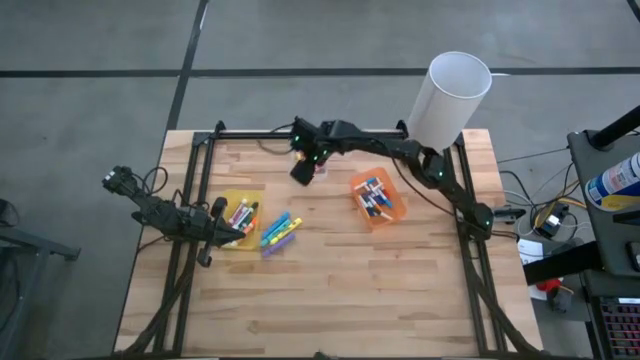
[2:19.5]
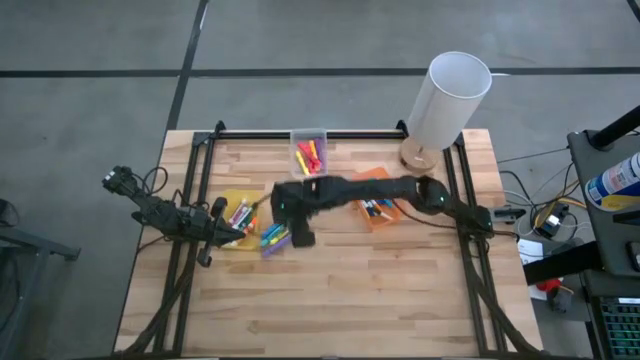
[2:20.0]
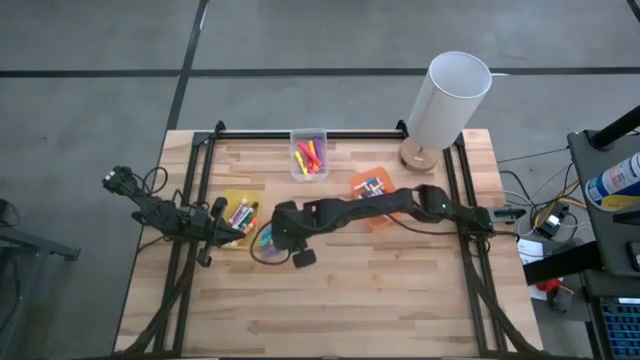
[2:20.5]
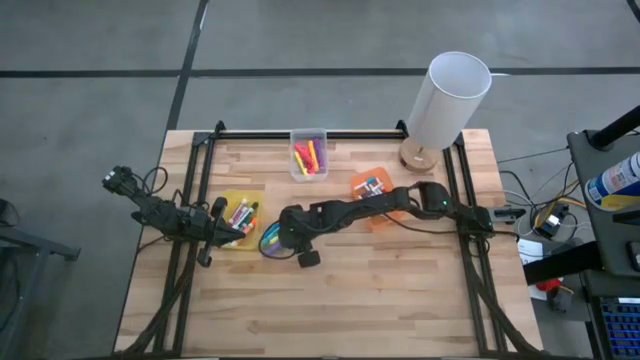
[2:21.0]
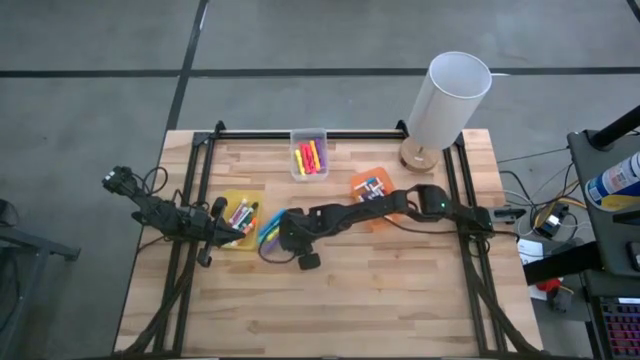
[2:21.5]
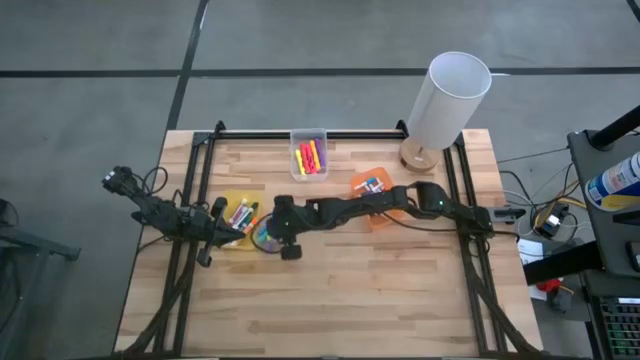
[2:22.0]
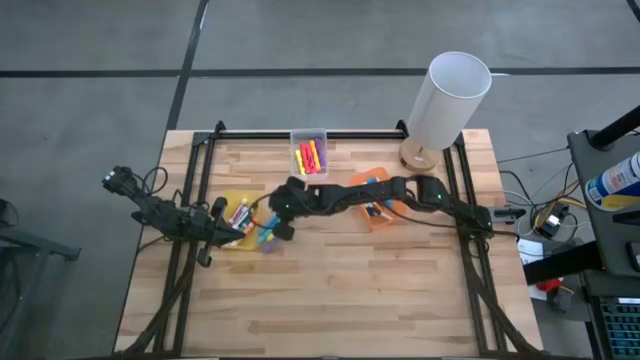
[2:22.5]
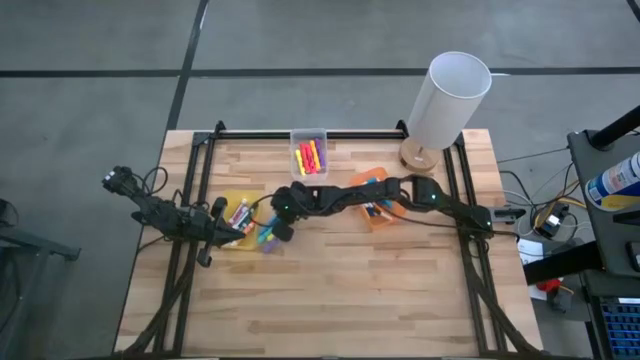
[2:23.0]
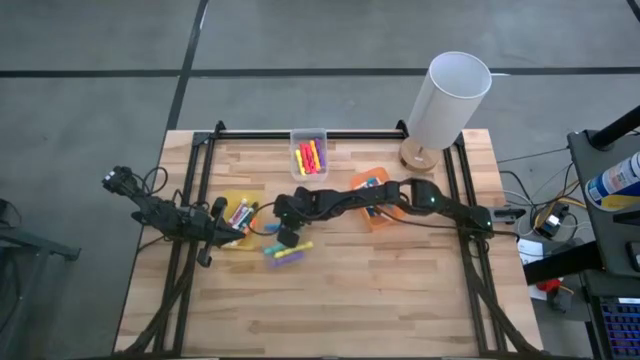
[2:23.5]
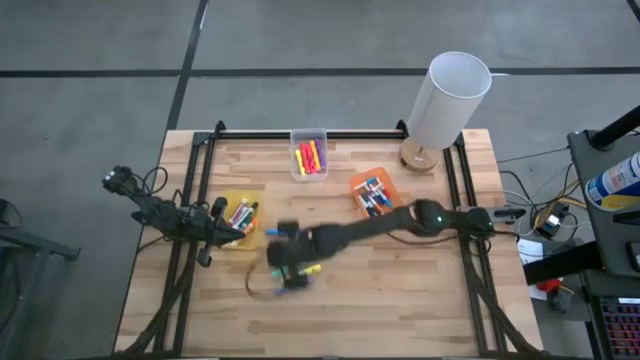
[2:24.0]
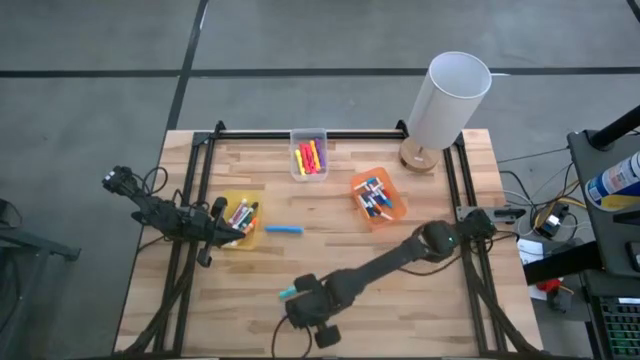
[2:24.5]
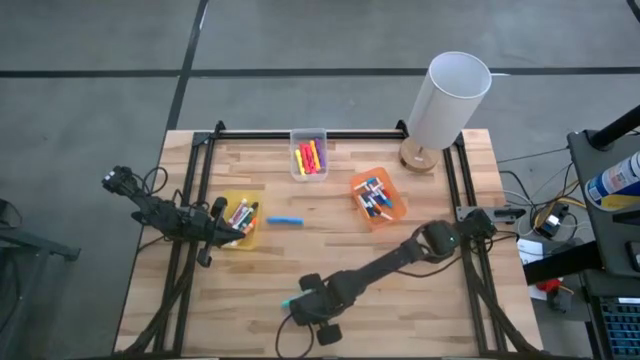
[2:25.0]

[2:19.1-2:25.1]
Task: Pick & Place Markers
Adjust the highlighters

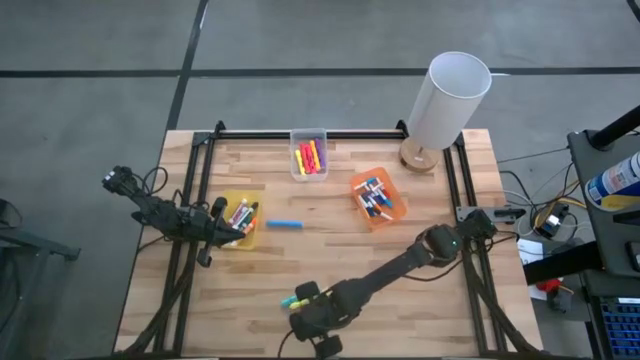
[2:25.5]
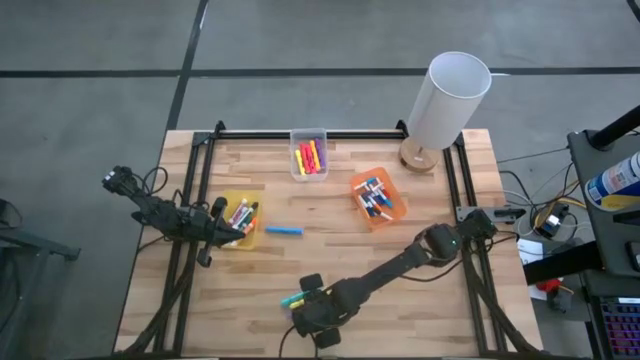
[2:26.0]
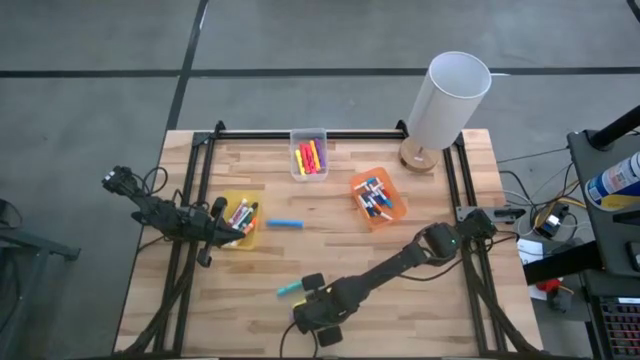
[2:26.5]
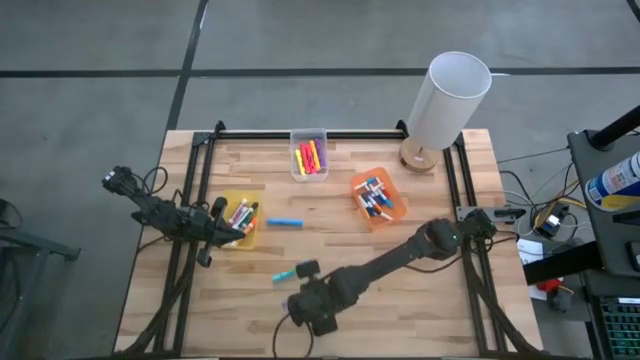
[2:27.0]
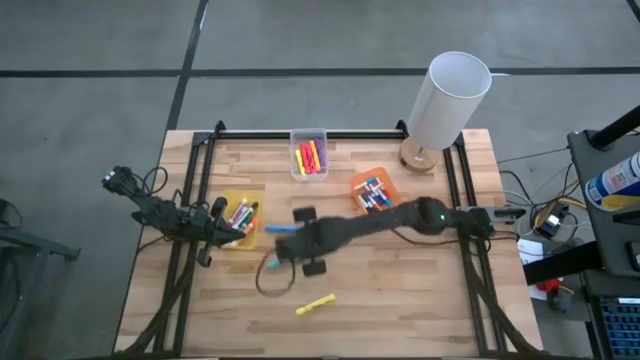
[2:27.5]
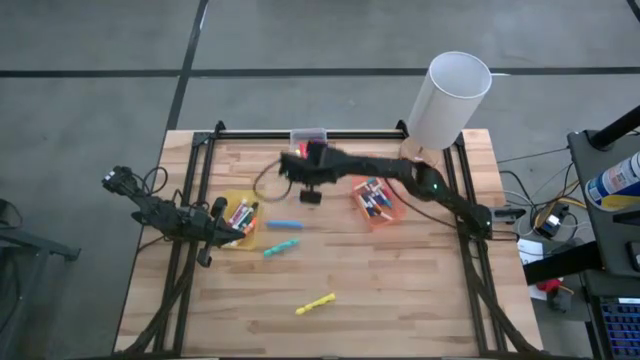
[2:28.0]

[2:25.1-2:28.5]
Put the light purple highlighter into the transparent bin

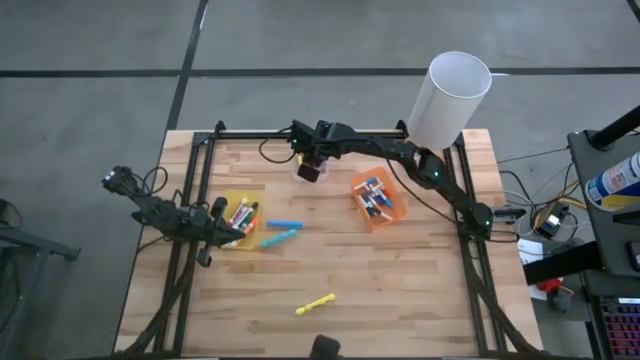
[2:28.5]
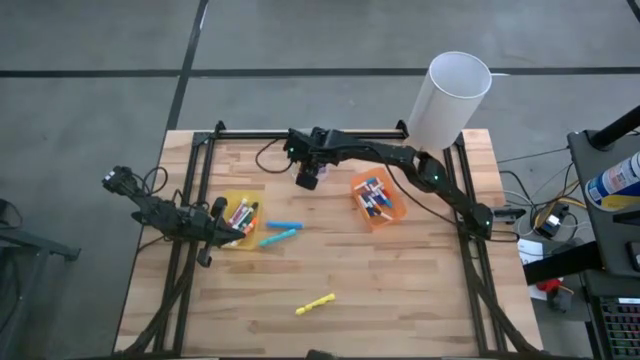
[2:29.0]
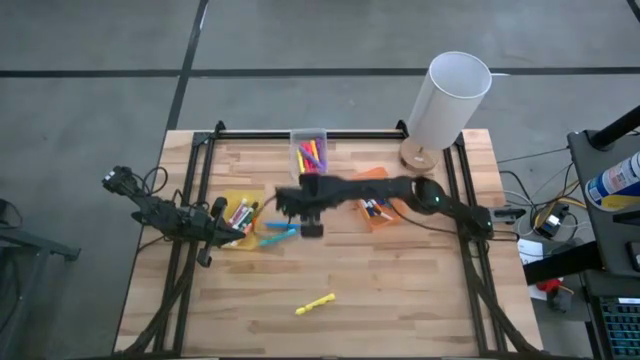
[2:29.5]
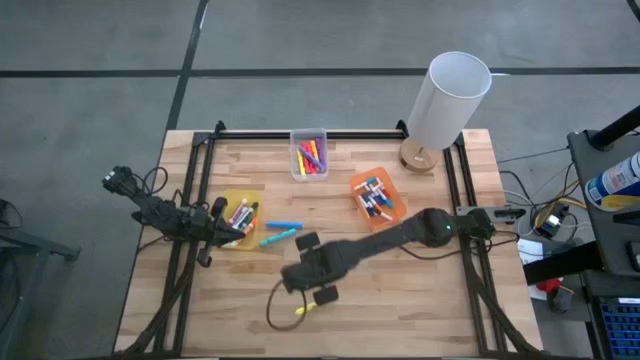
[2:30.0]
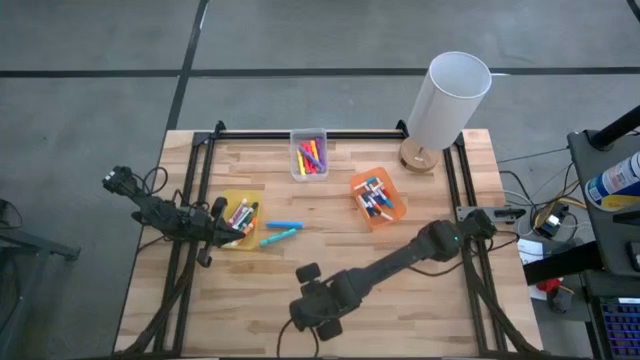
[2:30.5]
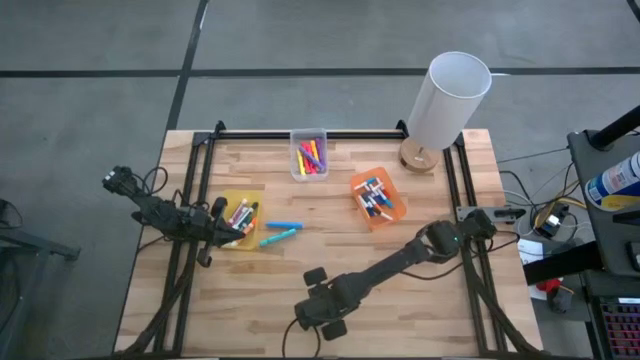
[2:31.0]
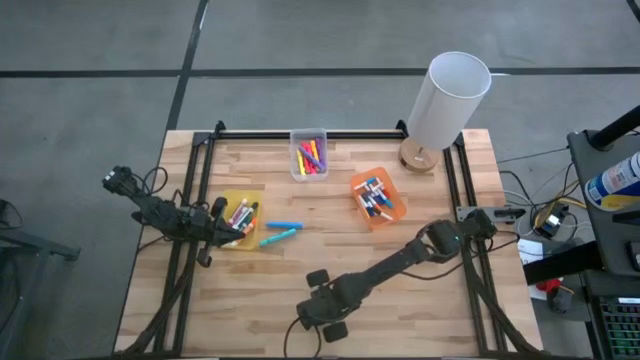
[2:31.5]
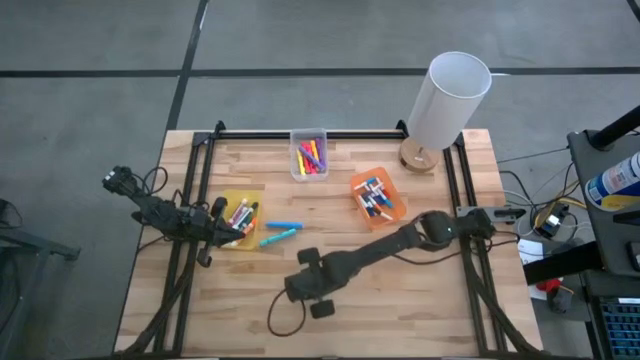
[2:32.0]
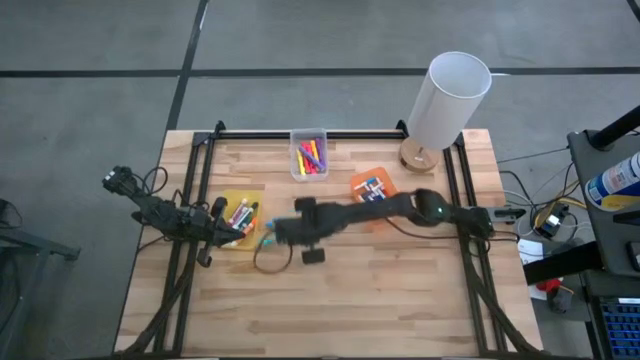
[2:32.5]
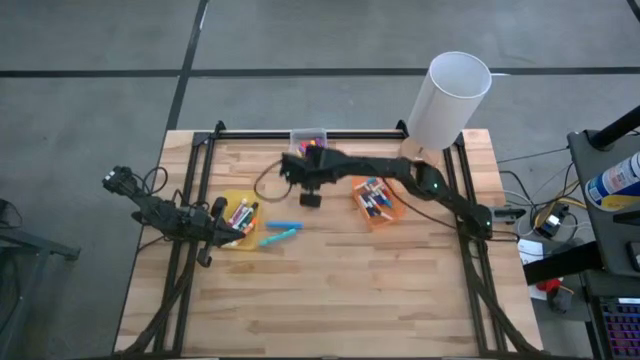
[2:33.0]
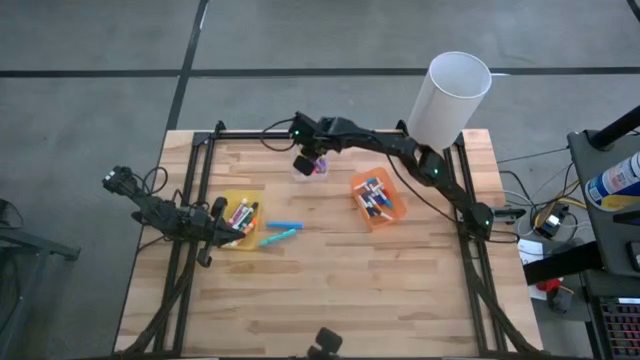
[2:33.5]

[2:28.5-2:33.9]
Put the light yellow highlighter into the transparent bin

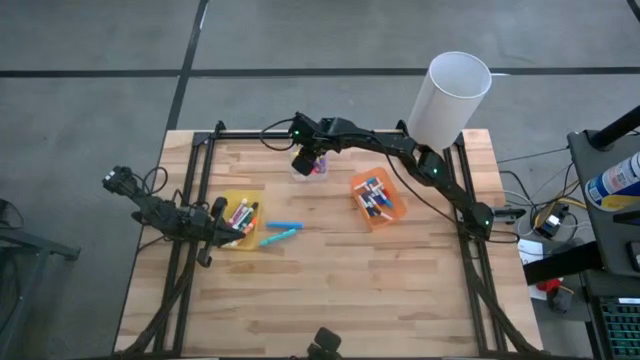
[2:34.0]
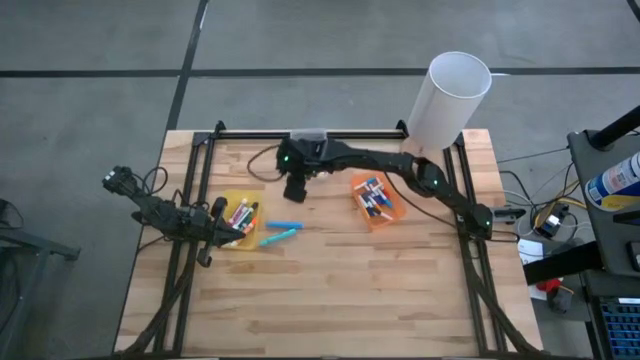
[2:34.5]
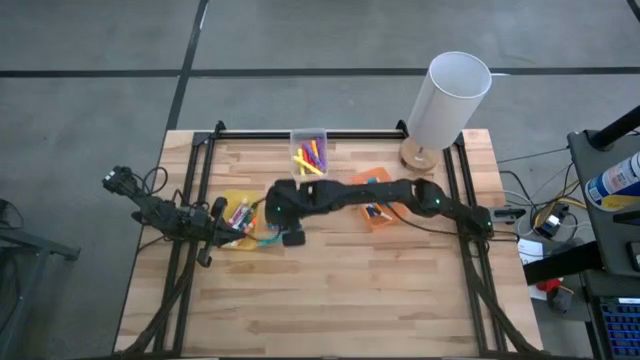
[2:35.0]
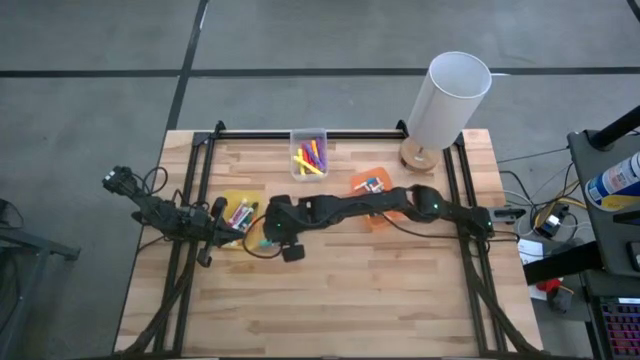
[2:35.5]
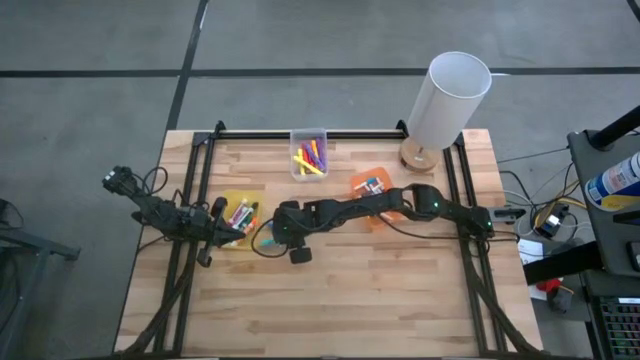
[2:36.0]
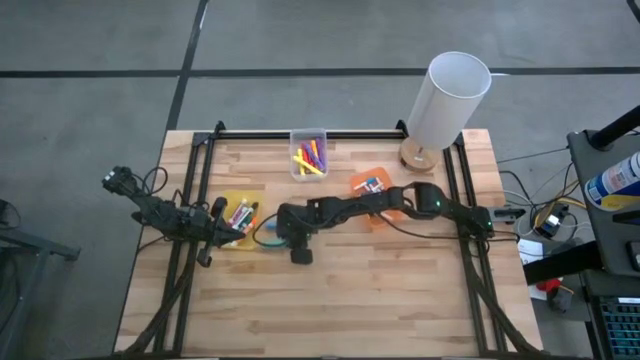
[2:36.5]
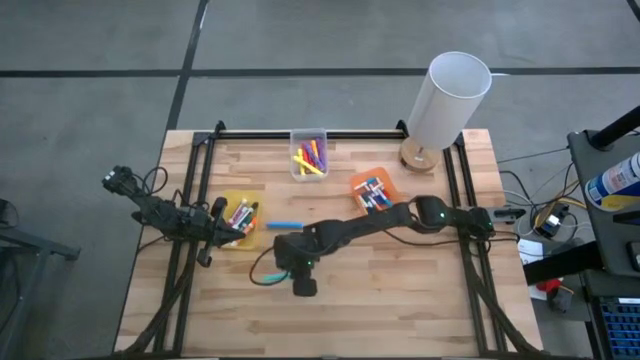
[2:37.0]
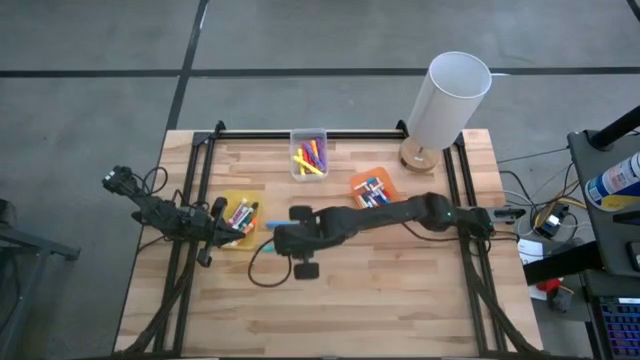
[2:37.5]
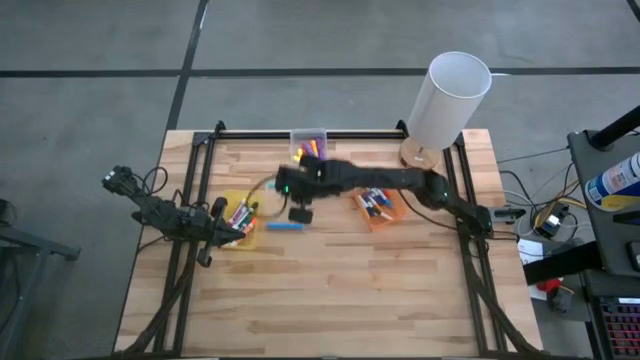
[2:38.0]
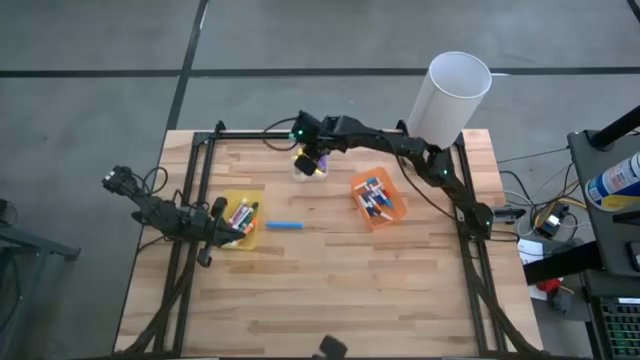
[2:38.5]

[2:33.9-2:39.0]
Put the light blue highlighter into the transparent bin

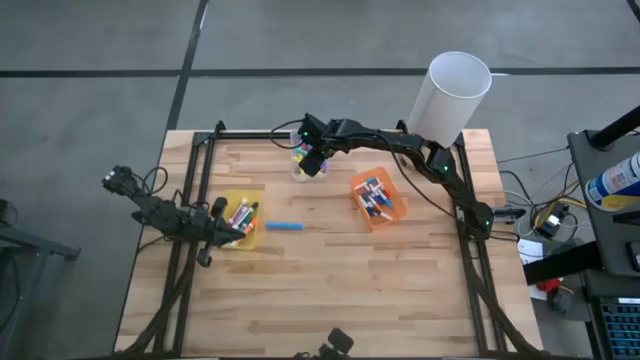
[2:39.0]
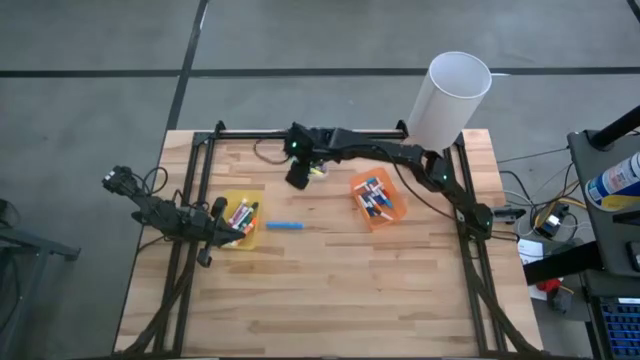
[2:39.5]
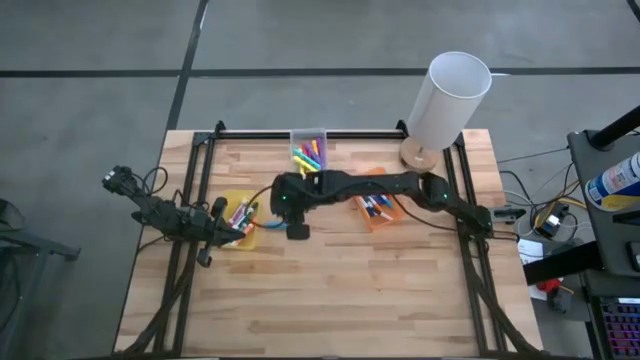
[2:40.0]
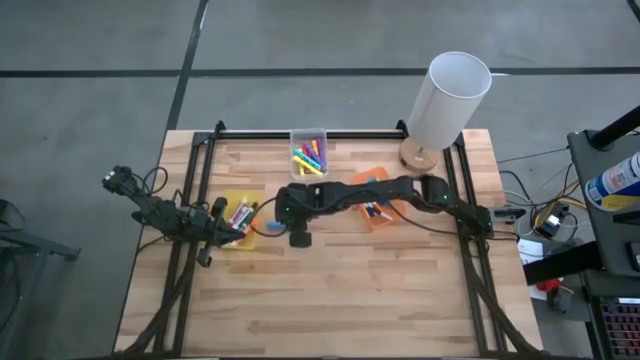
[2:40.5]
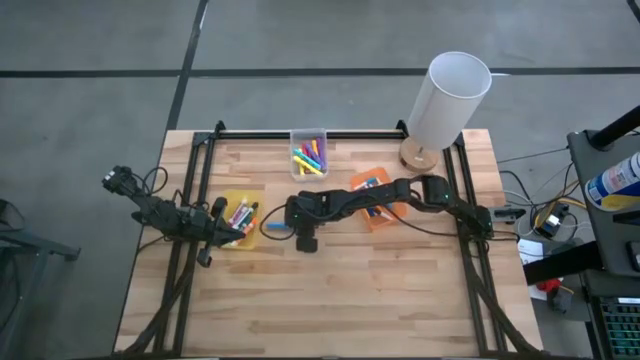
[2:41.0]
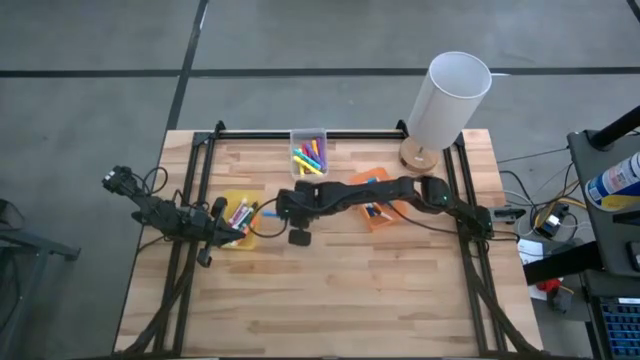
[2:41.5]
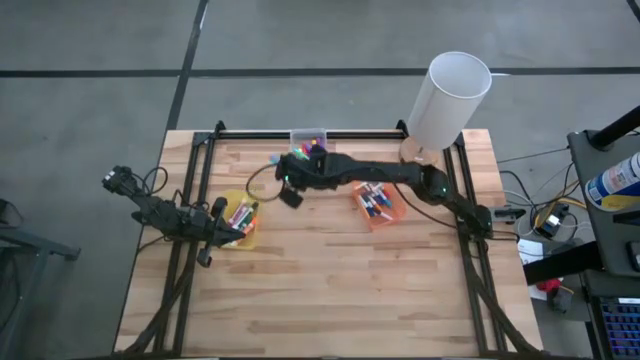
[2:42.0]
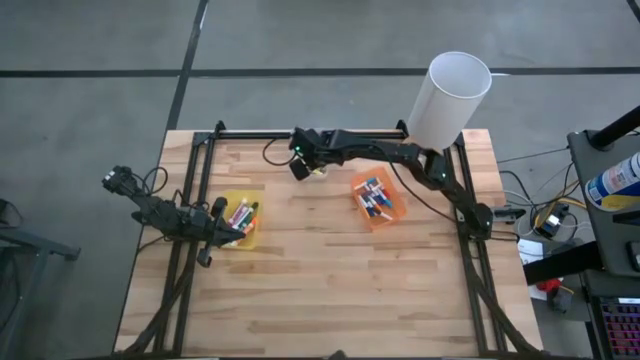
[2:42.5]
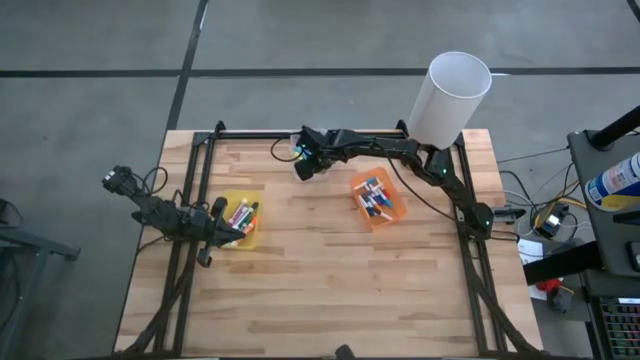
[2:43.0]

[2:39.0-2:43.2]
Put the blue highlighter into the transparent bin
